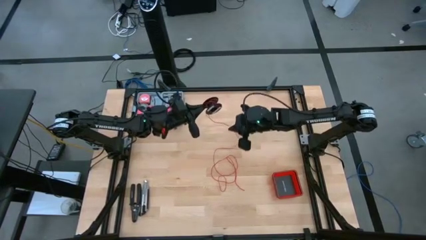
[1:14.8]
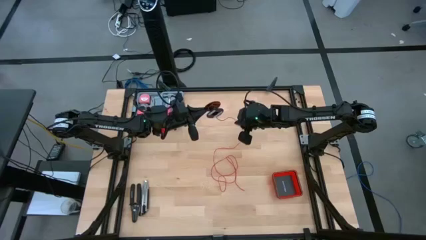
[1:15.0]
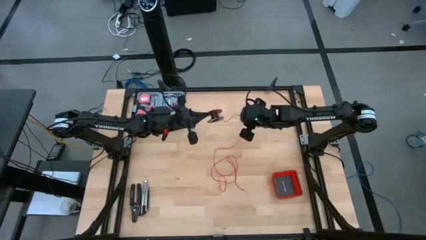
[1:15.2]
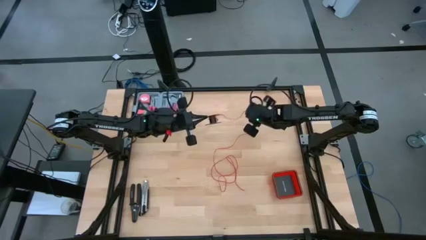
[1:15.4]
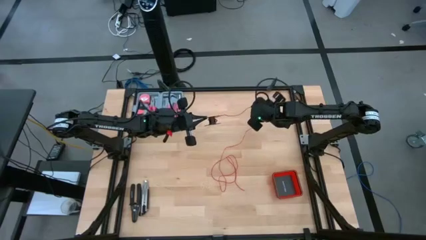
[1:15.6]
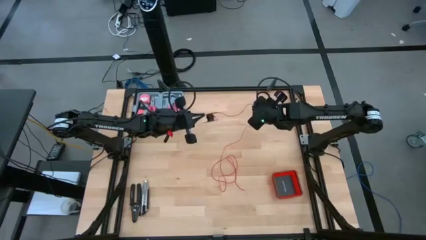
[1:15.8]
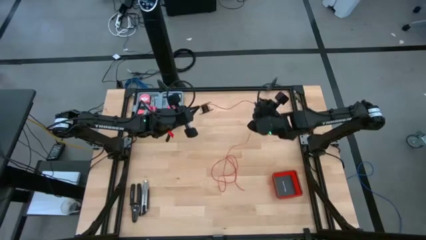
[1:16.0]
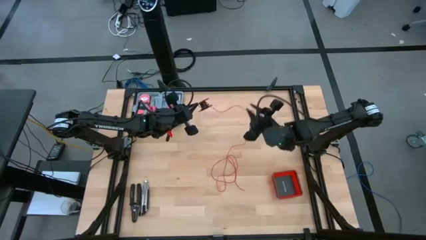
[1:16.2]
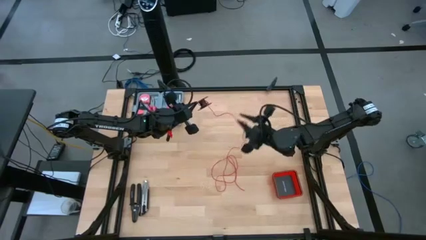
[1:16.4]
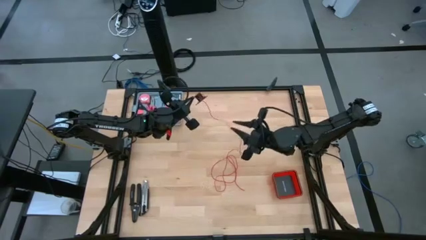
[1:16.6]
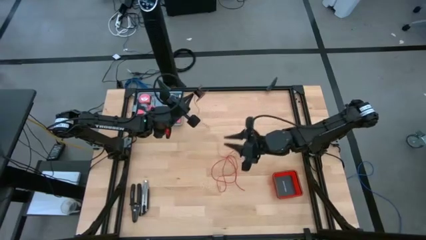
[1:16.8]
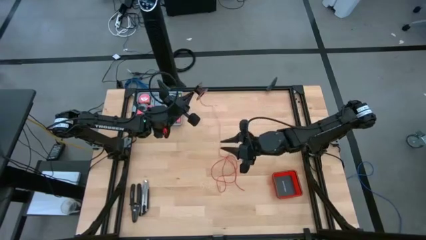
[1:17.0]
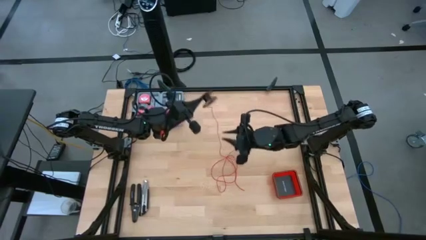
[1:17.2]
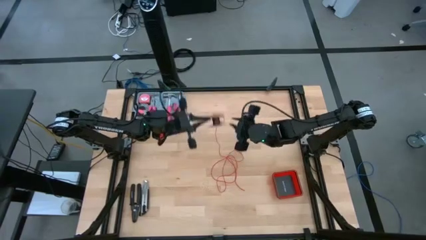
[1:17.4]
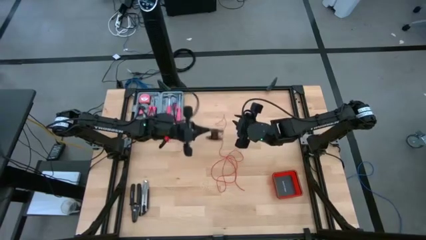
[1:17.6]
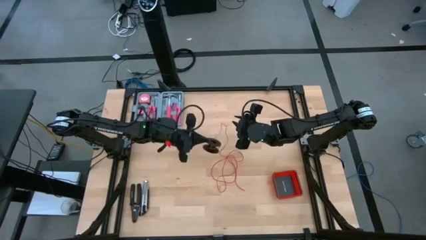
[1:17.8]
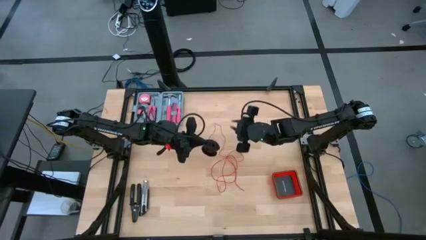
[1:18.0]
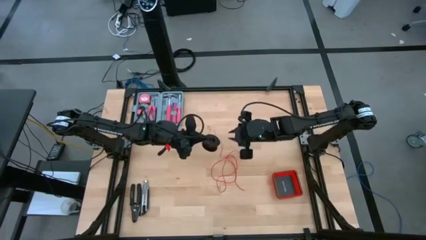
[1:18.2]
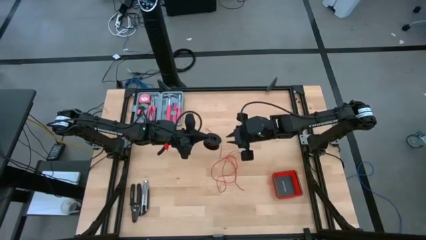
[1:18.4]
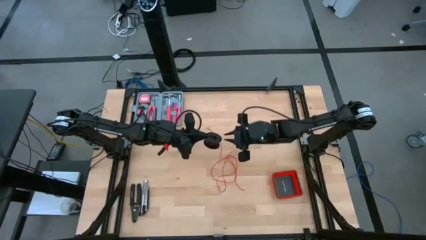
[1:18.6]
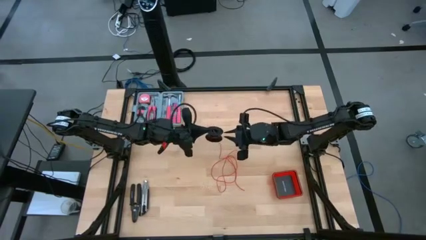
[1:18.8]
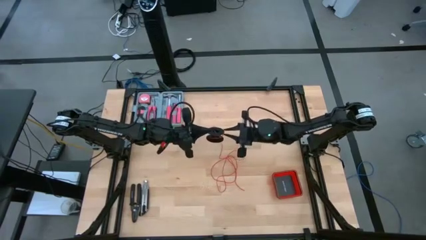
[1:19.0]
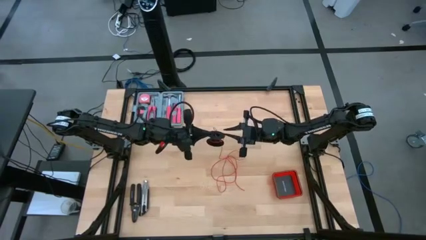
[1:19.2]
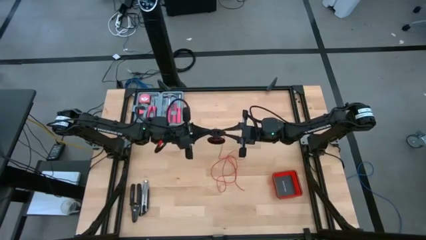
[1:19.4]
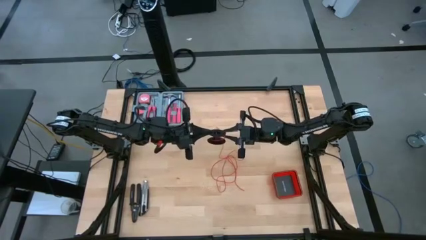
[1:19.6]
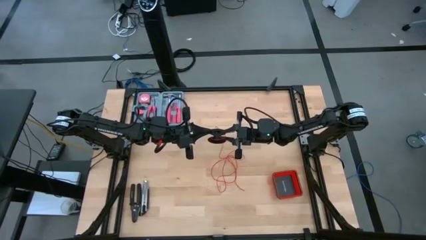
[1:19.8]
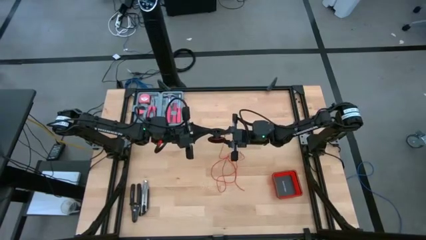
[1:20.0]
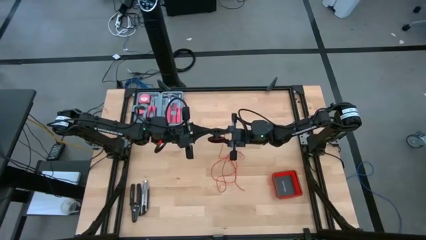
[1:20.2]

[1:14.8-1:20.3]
Task: Coil cords
Uncoil the red wire from the spool

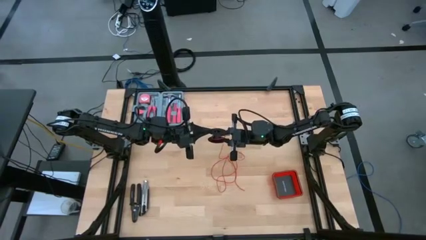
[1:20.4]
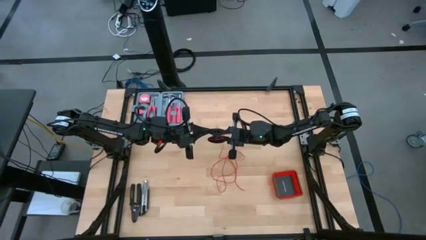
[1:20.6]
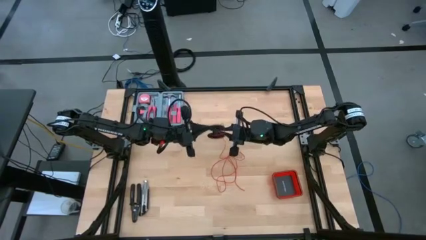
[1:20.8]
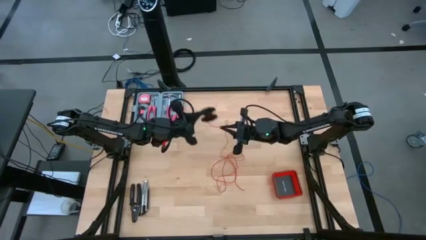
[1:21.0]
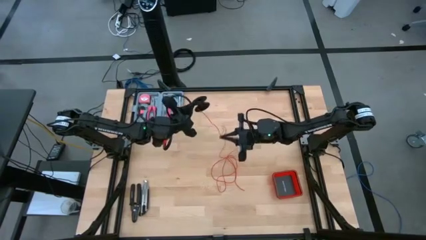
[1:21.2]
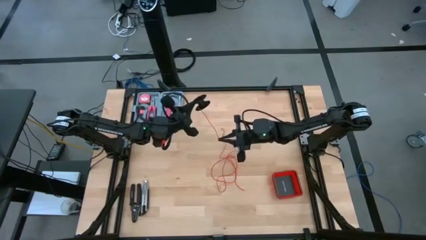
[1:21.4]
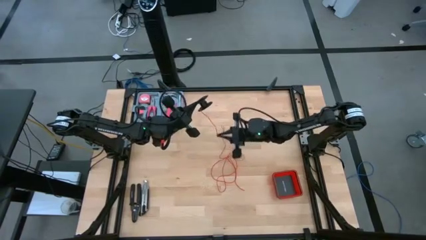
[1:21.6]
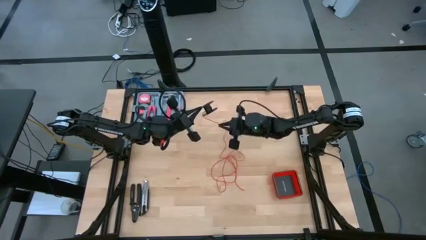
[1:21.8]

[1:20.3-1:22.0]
Uncoil the red wire from the spool

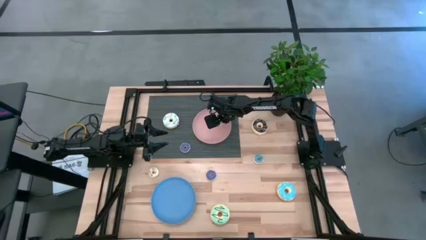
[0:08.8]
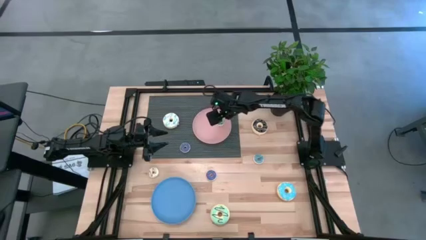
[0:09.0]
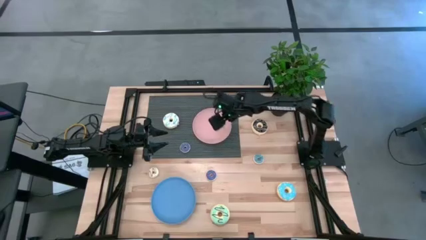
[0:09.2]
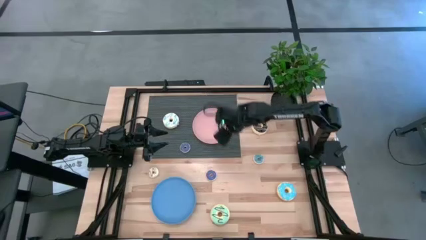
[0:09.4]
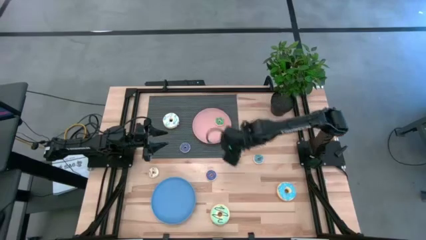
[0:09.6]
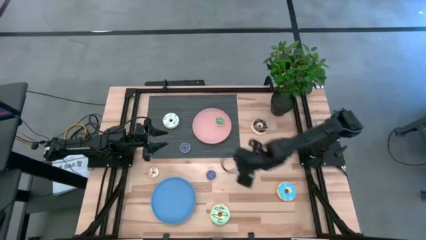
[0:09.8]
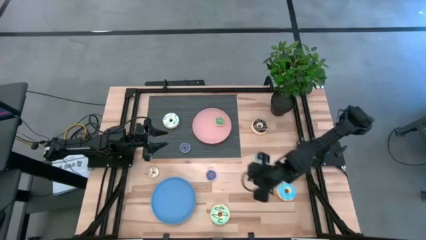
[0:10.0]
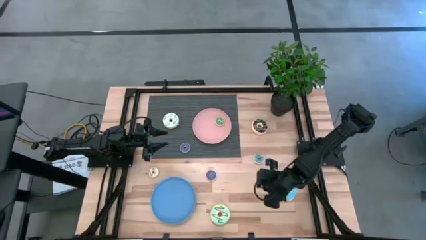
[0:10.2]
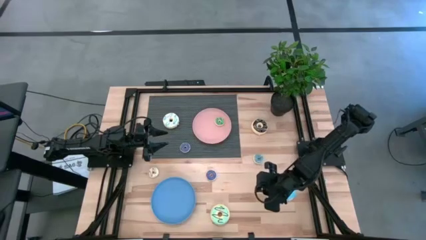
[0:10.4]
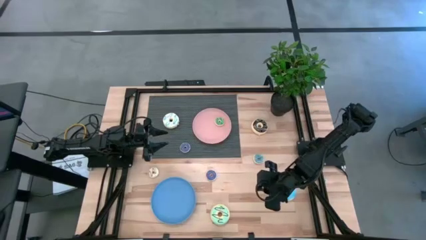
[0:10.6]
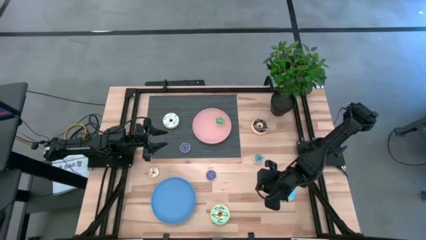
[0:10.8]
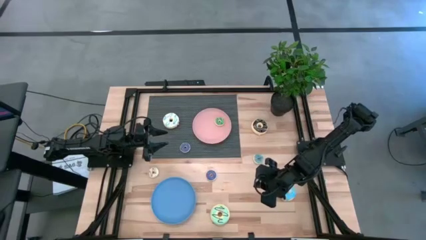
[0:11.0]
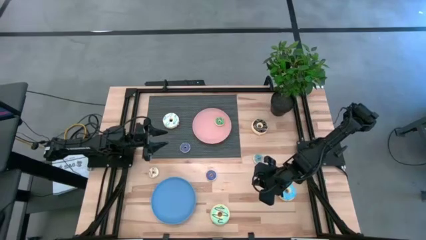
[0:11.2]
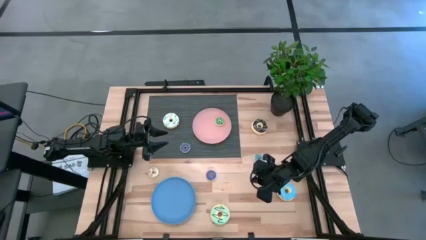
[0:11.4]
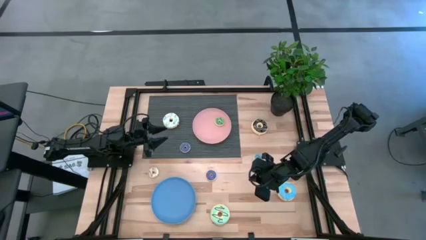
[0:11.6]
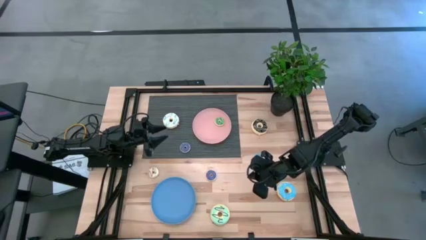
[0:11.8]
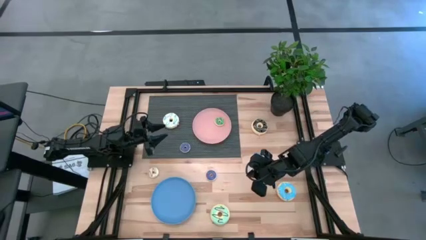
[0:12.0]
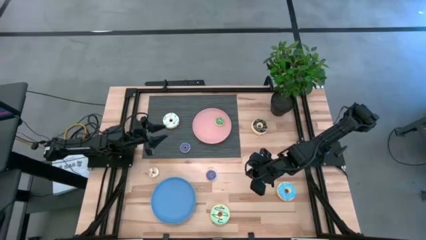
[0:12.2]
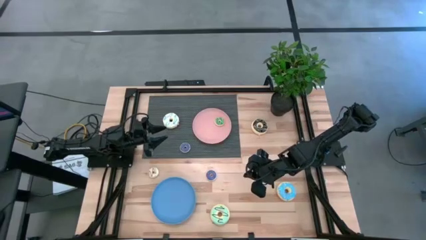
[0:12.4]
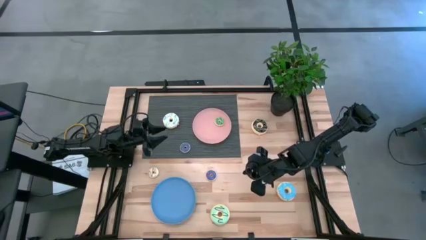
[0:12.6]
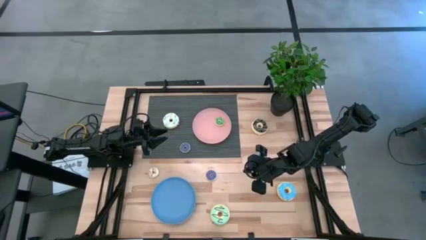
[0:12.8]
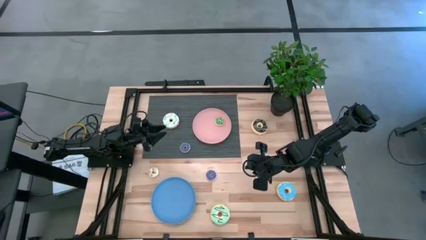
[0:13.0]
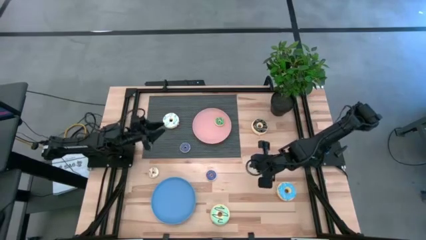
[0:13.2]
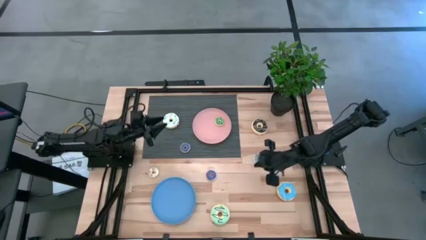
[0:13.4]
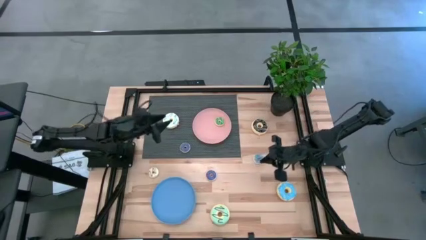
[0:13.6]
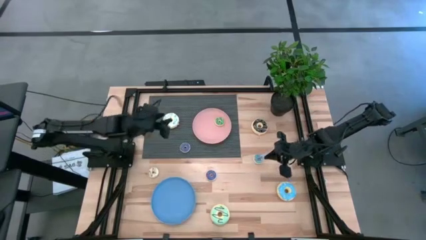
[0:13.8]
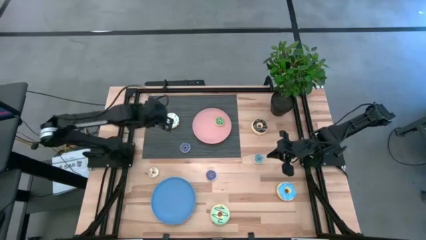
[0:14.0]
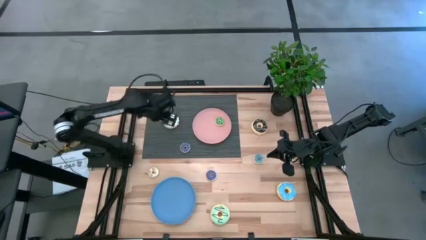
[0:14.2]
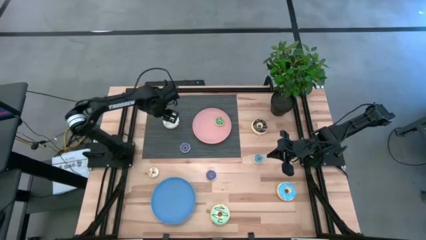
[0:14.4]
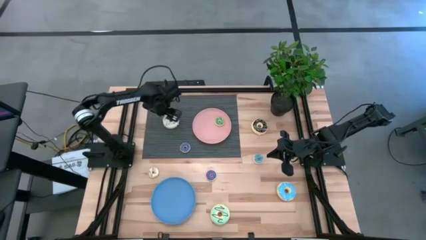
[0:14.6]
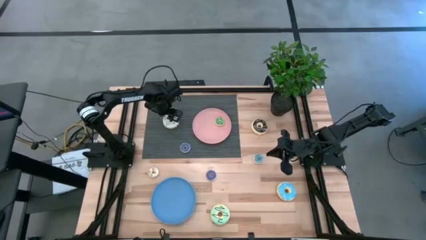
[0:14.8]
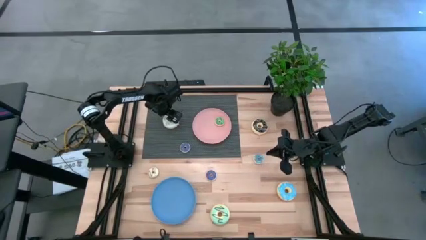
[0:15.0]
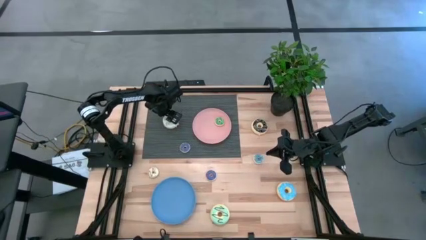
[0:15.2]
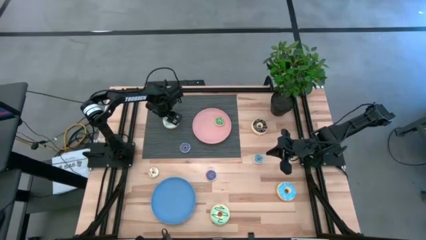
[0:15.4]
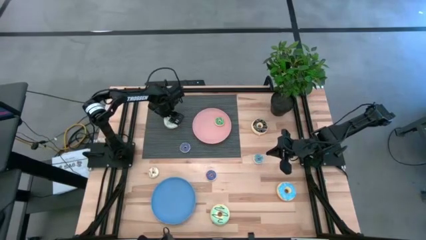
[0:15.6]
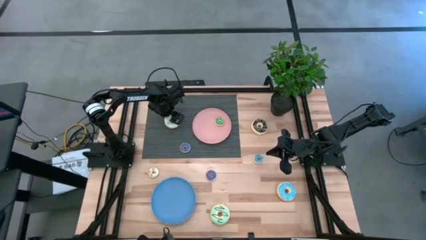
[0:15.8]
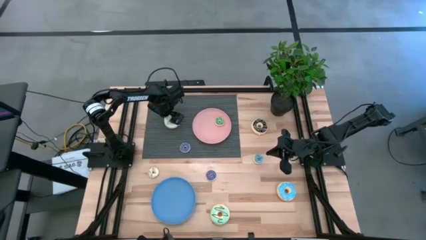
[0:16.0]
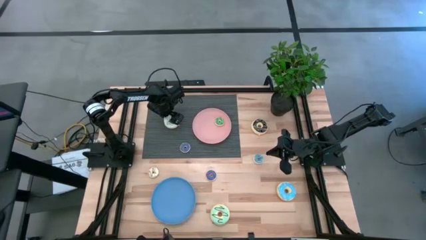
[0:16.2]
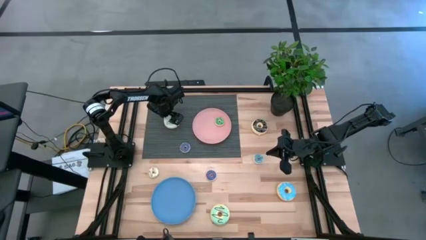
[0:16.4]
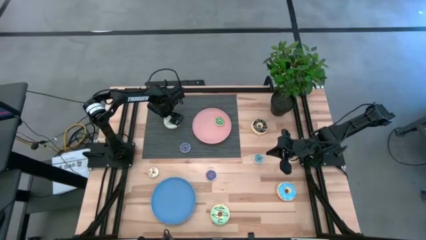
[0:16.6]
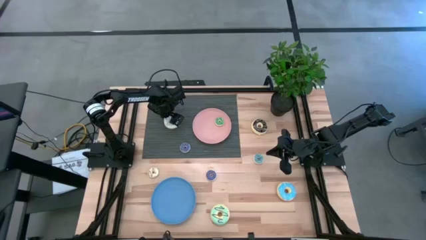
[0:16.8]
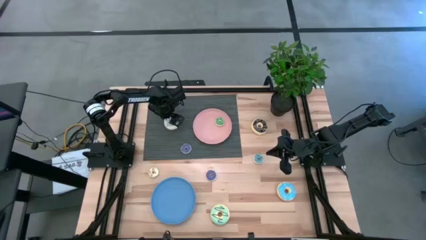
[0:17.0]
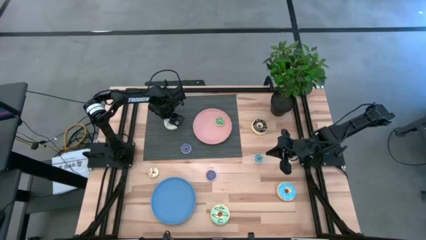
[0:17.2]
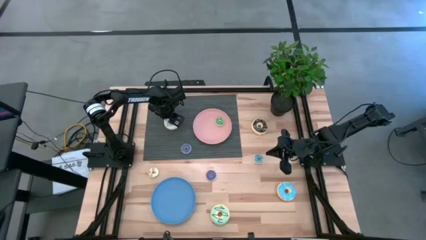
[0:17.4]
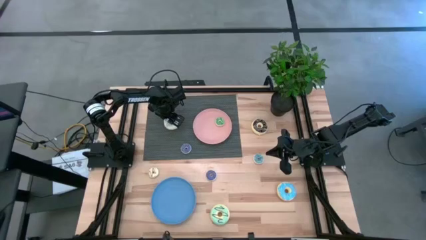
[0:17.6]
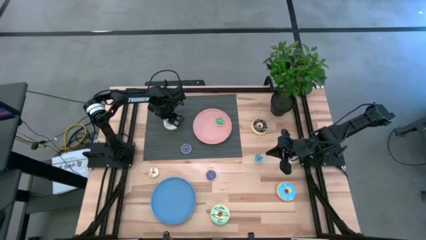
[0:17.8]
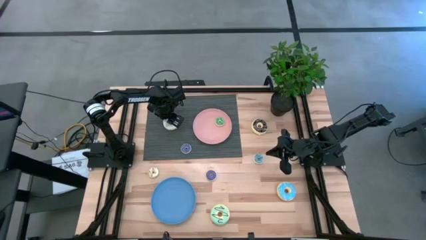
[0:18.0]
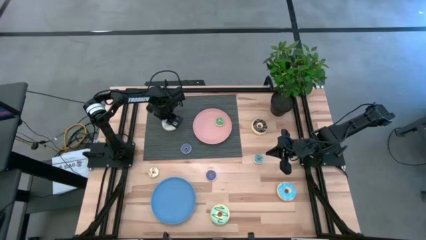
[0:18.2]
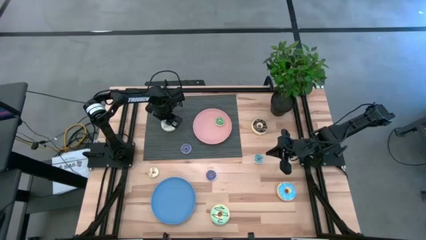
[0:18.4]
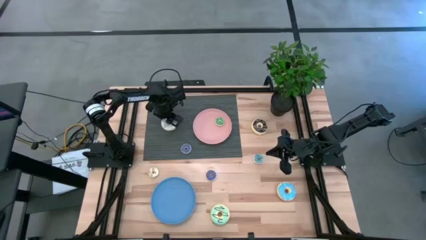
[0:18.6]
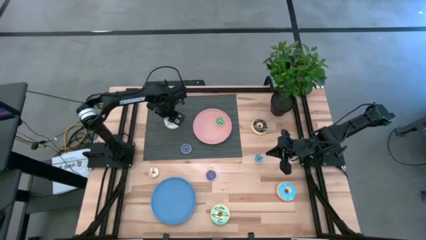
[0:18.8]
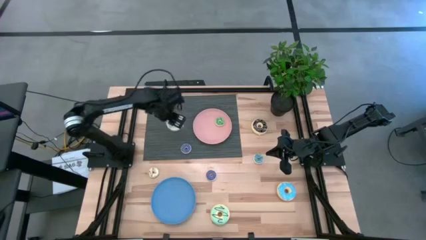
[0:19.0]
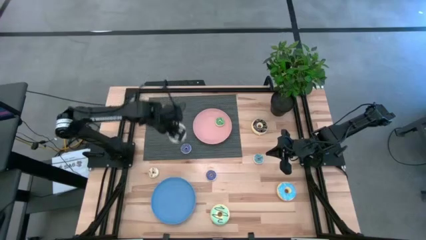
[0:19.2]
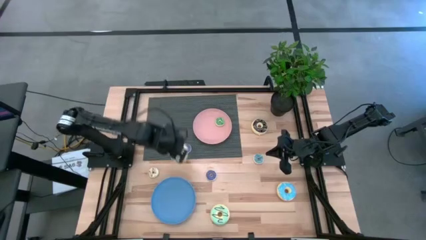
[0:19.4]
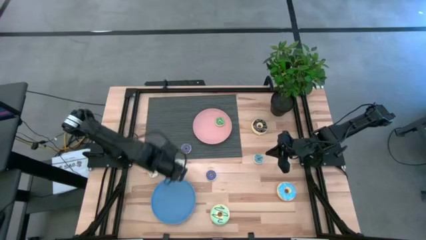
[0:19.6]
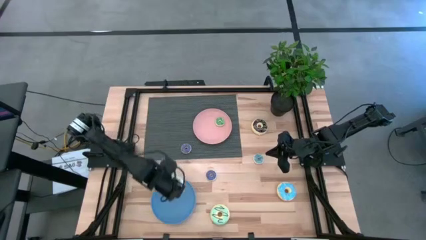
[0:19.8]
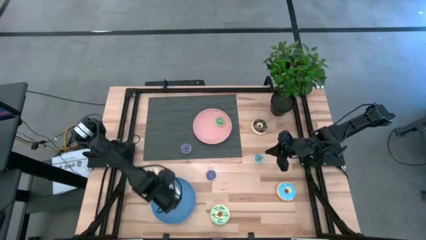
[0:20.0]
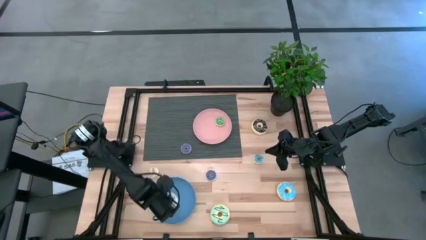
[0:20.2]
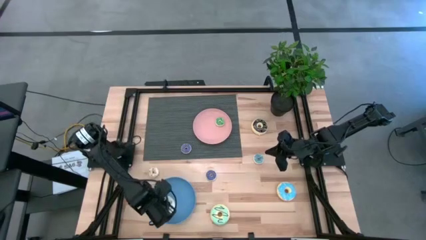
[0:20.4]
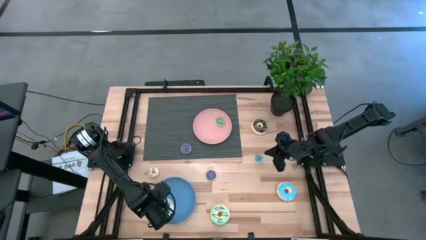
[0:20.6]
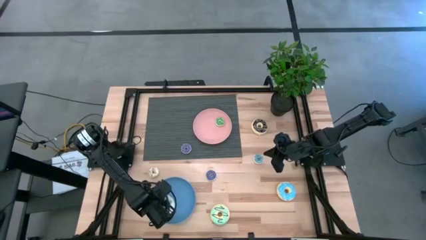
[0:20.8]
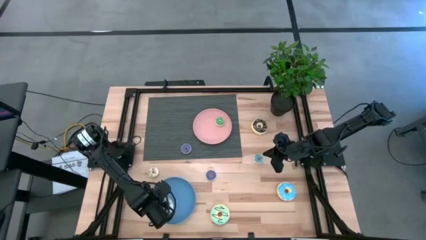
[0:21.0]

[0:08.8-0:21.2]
Task: Pick & Place donuts
Put the big white donut on the blue plate
